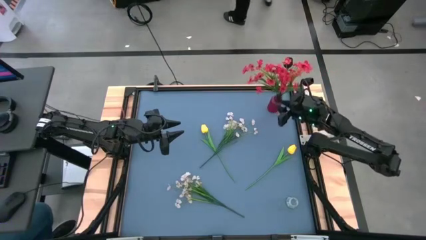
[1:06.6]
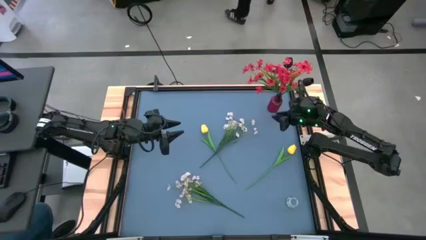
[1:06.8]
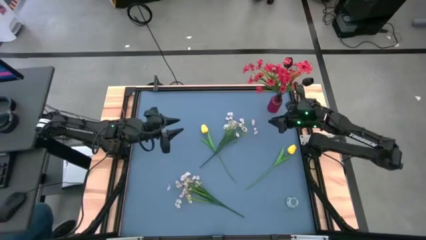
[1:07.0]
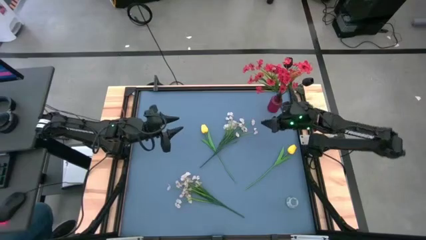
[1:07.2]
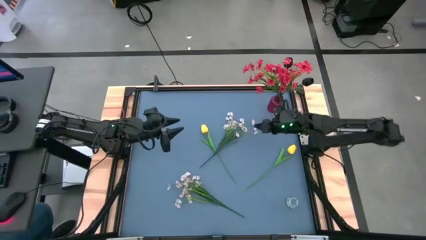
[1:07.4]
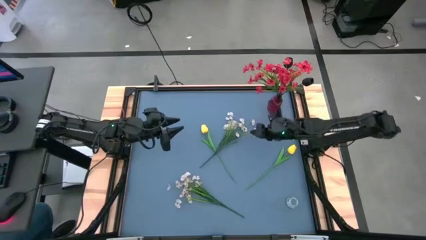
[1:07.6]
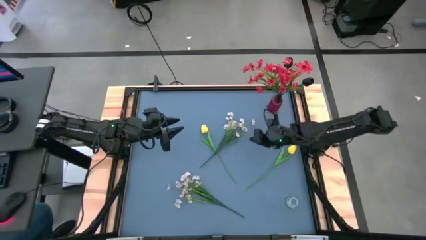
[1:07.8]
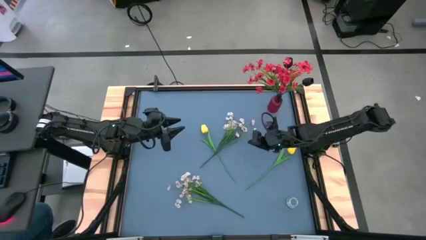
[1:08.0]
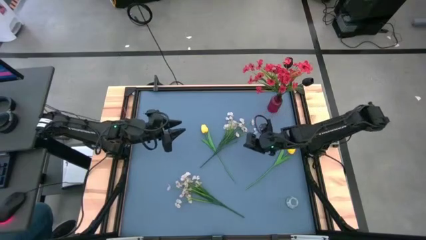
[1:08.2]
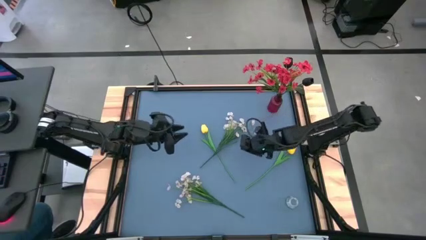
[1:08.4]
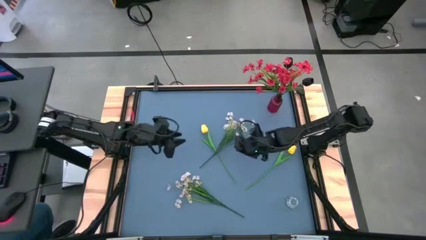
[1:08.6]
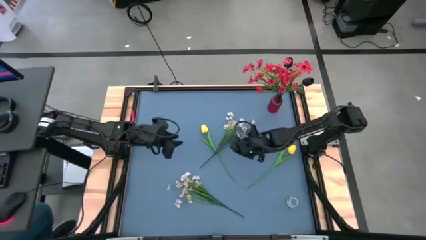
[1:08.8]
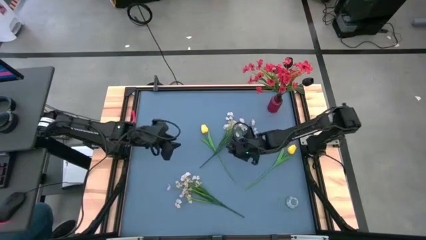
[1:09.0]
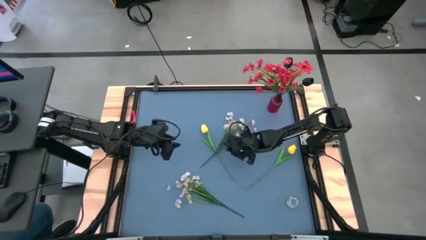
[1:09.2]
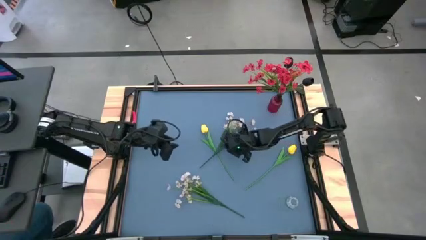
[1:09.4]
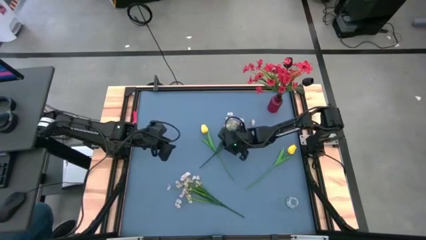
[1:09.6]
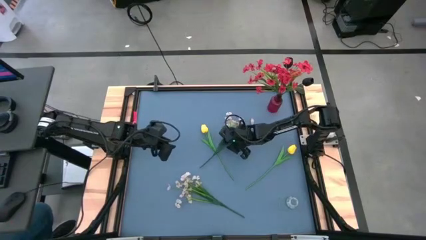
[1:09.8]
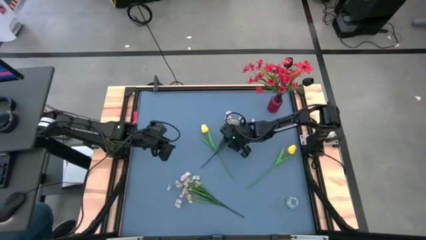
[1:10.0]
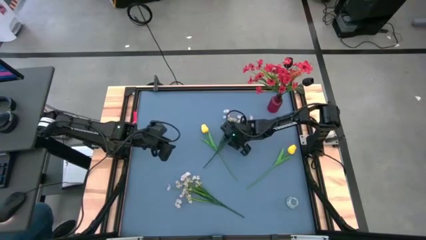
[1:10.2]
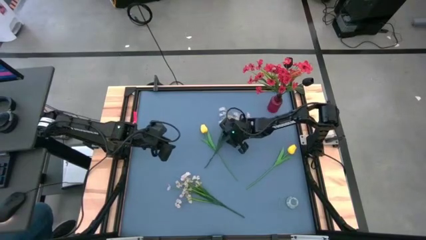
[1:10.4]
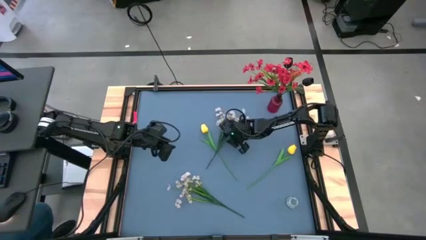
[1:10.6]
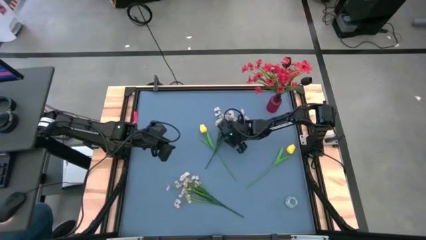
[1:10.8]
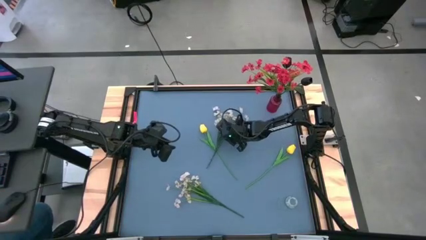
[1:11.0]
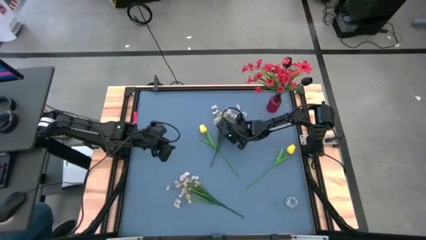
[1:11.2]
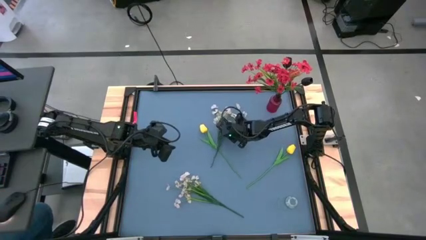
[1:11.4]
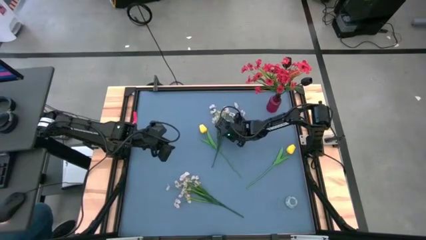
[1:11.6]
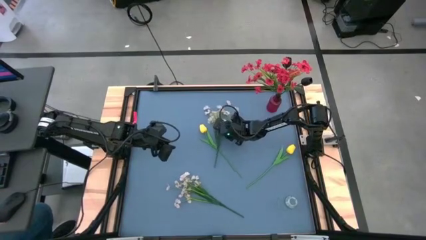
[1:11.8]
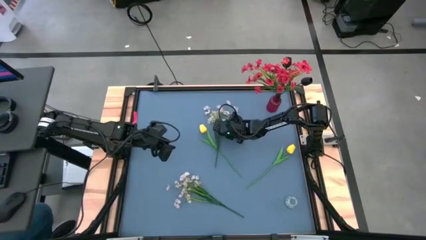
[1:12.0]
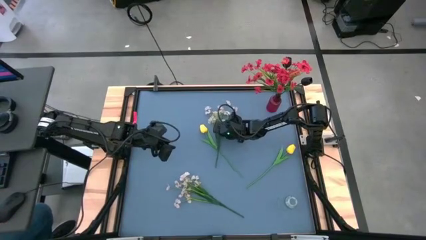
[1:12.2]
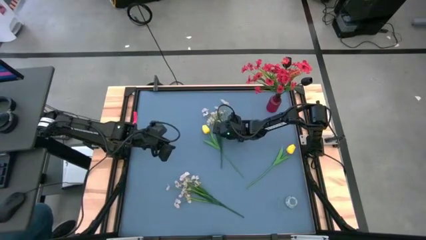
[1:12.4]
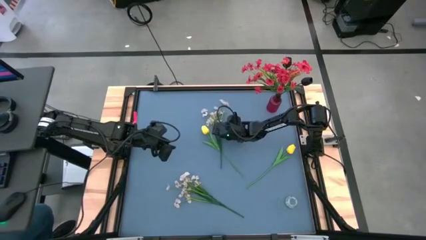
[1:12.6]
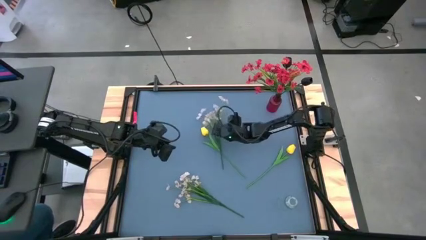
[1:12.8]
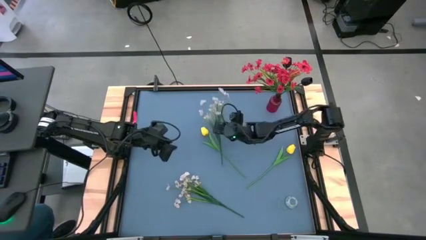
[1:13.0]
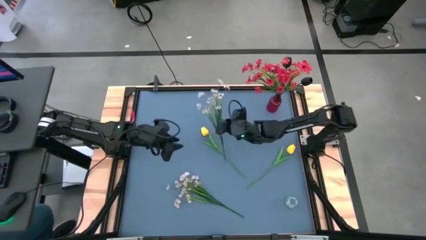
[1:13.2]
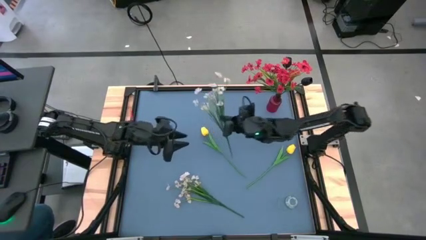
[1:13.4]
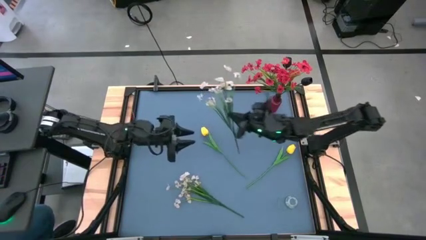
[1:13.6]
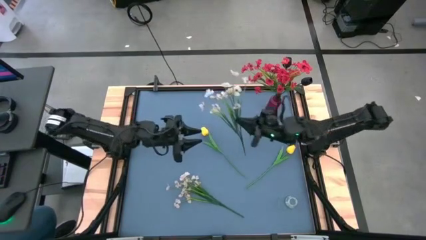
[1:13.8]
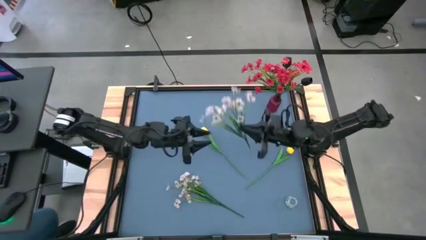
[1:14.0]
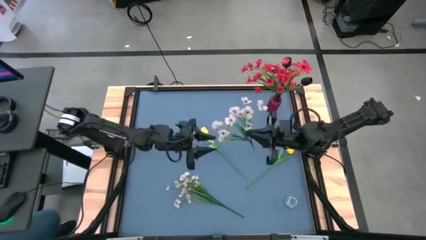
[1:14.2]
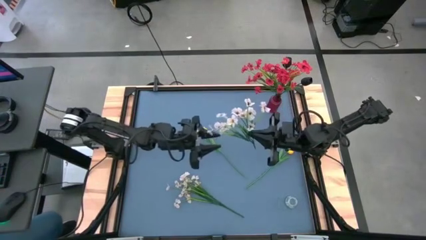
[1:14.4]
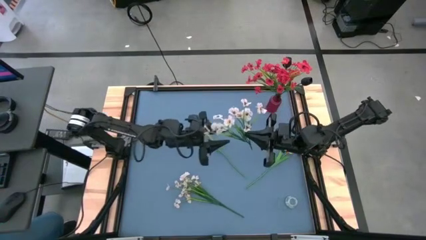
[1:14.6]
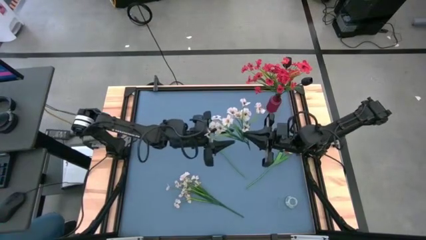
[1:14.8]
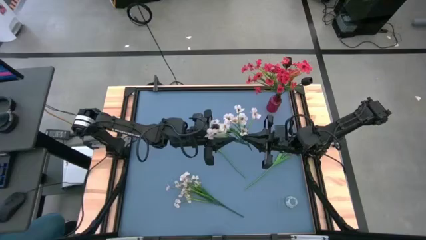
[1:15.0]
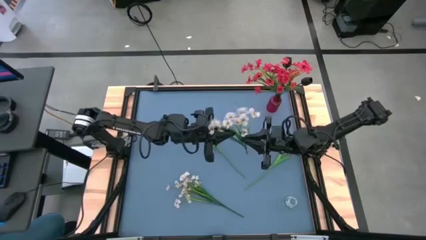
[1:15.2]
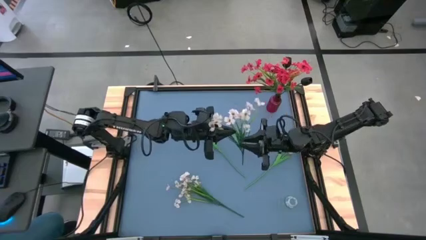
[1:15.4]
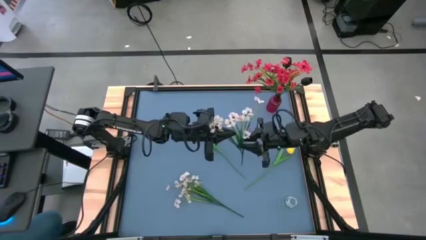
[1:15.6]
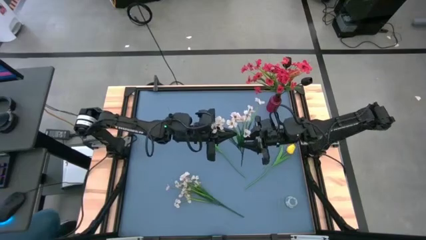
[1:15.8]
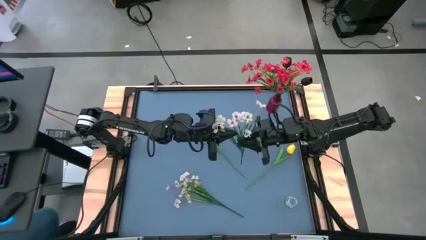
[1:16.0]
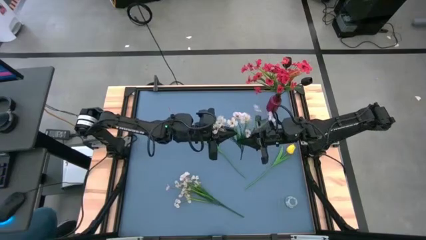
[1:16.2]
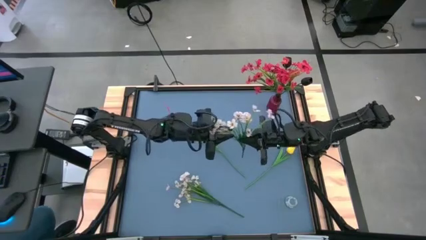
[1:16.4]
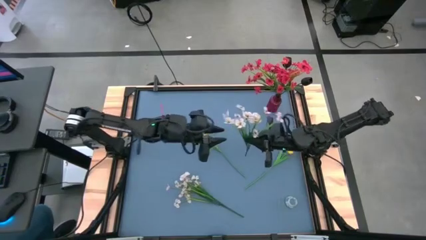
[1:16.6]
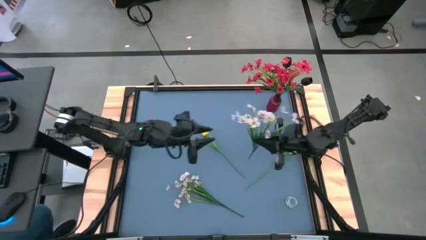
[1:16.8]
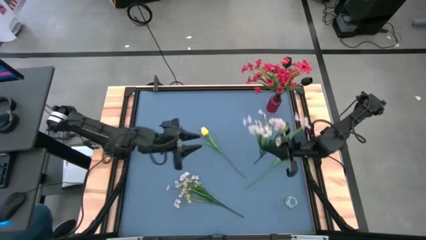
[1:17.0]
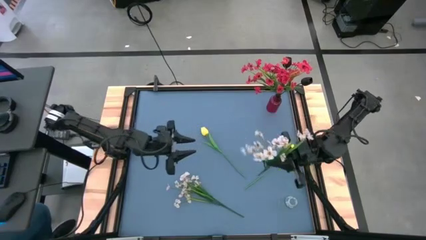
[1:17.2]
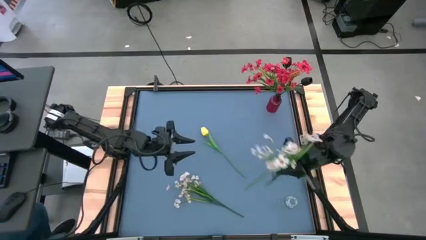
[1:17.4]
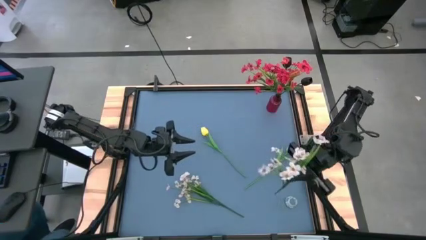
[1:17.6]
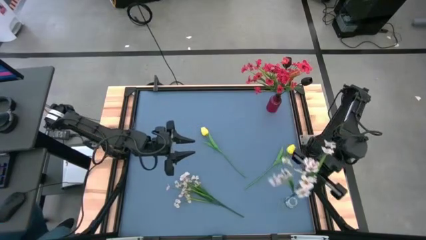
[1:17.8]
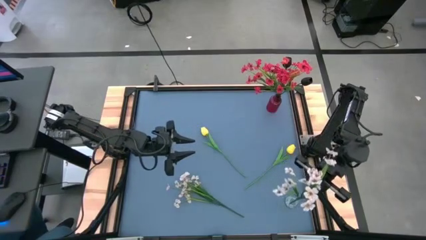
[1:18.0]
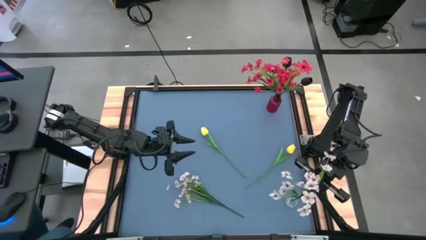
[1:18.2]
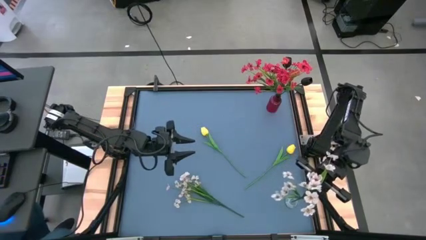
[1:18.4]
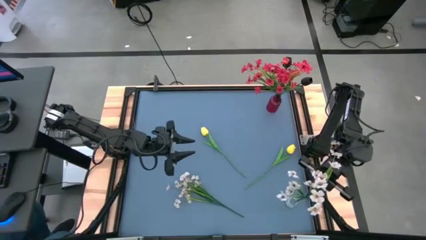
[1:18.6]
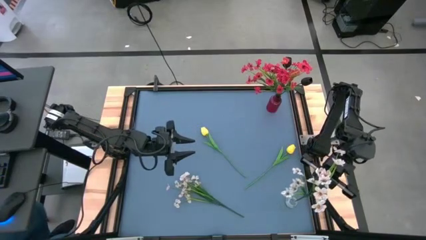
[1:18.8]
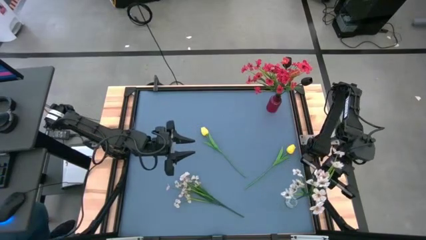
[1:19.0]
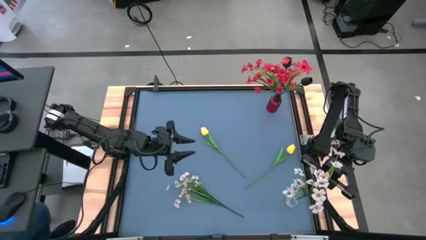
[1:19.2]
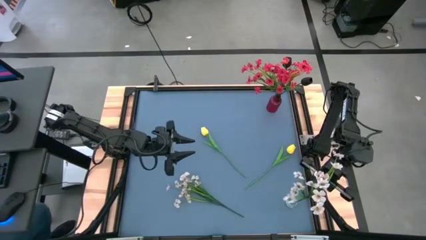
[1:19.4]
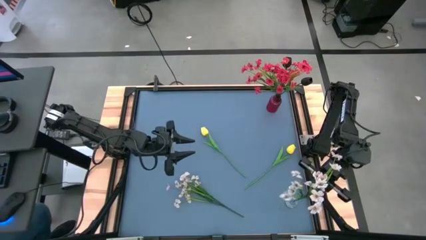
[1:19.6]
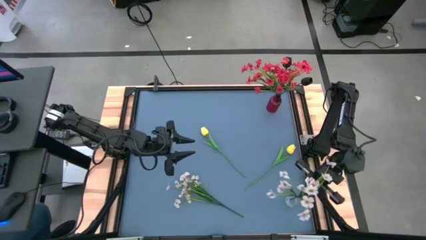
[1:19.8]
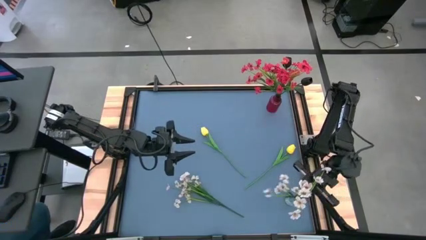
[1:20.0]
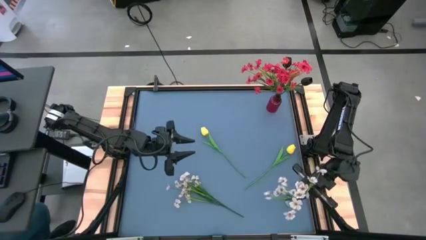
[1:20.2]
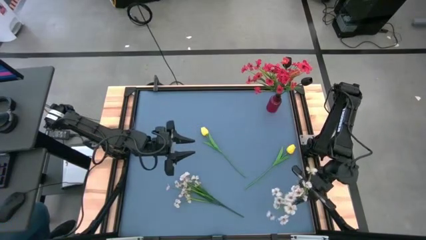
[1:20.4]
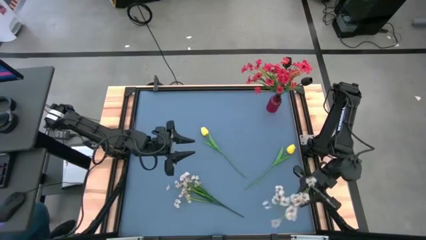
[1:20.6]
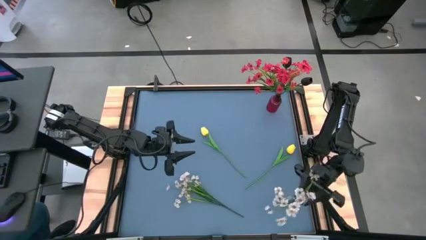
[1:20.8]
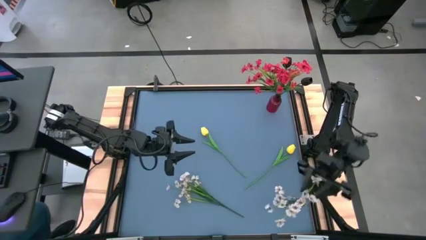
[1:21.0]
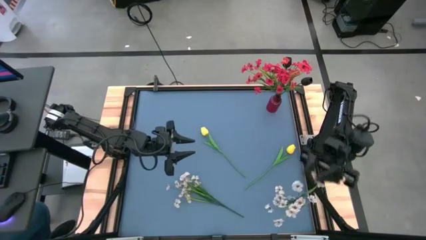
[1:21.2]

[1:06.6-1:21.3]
Task: Sort flowers into vase by color
Put the top white flowers into the transparent glass vase

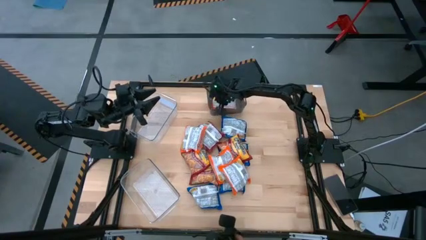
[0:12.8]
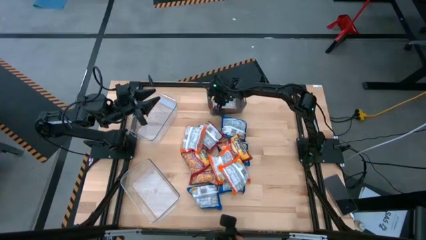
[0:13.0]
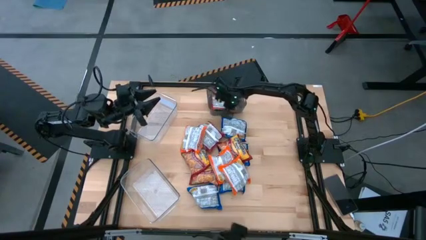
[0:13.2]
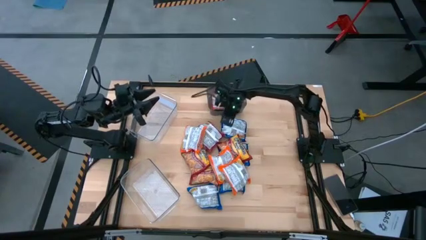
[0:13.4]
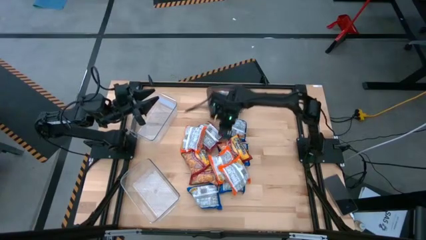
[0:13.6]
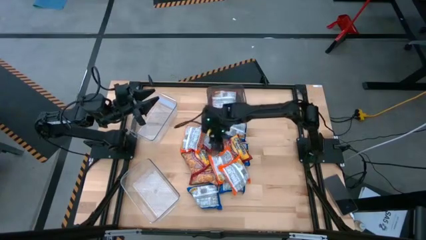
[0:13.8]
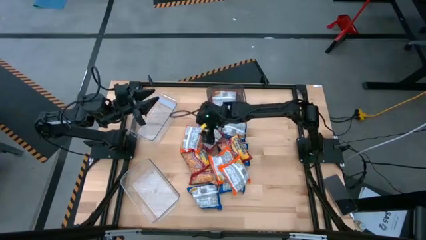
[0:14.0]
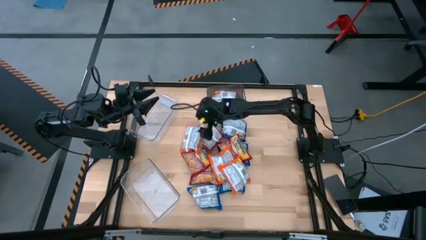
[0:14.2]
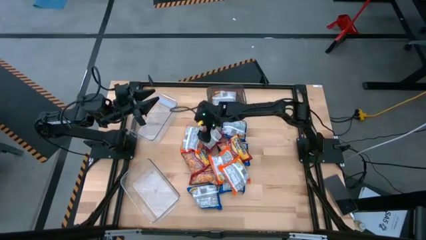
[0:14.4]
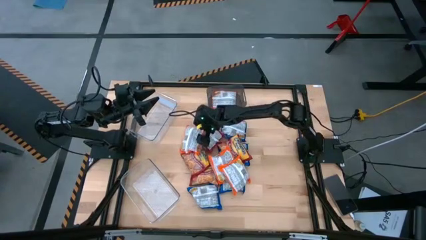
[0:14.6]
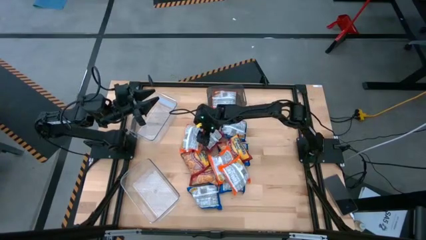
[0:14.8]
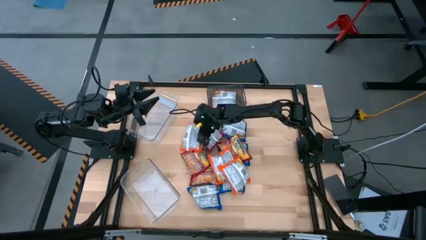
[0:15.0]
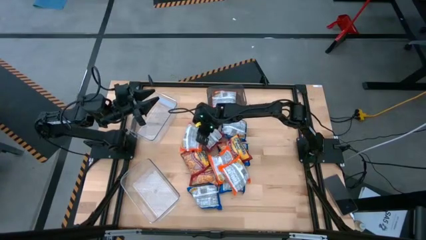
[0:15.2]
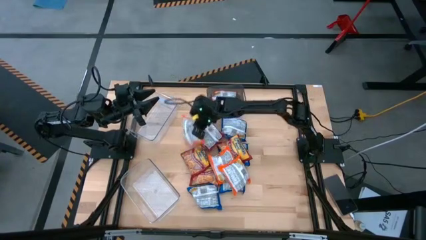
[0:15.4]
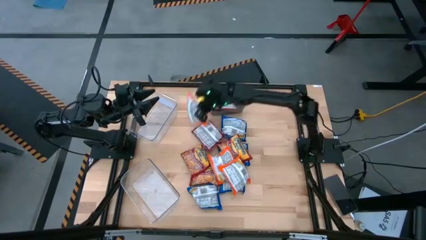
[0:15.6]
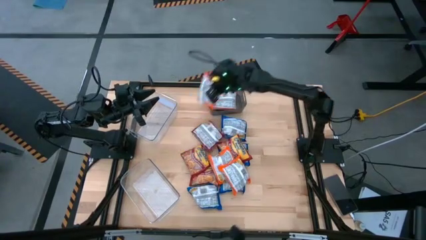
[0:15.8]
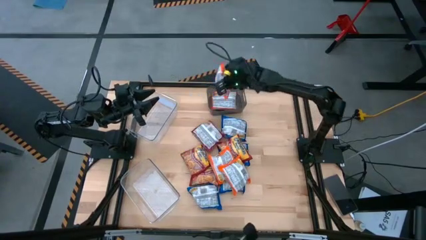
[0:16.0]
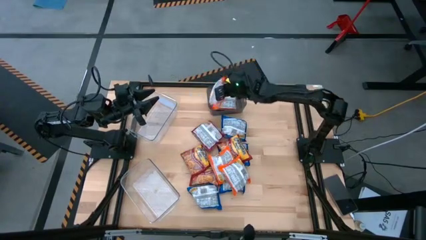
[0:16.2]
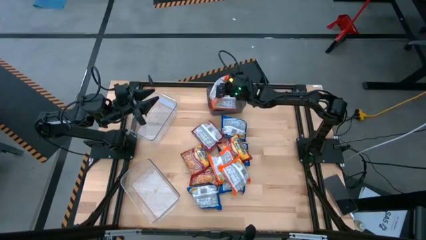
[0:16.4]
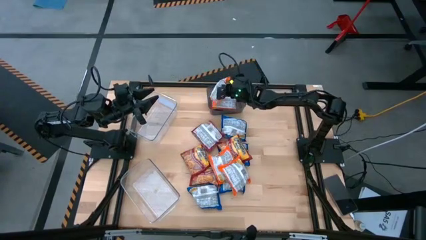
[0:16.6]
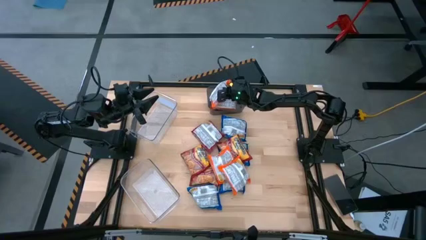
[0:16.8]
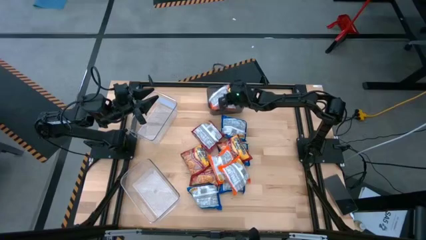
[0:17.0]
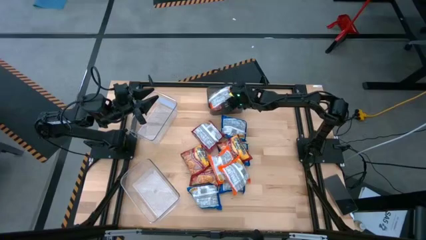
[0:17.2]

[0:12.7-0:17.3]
Task: Sort Maruchan noodles
Put the left orange noodle pack into the black bin
